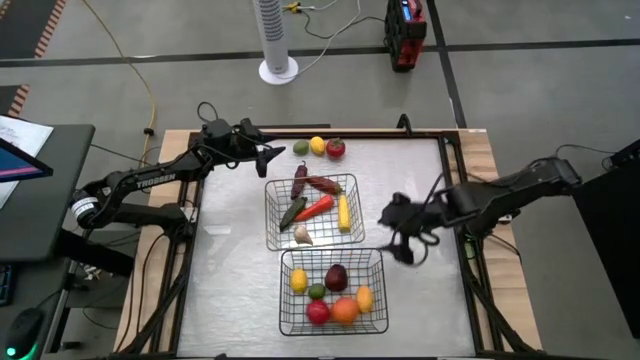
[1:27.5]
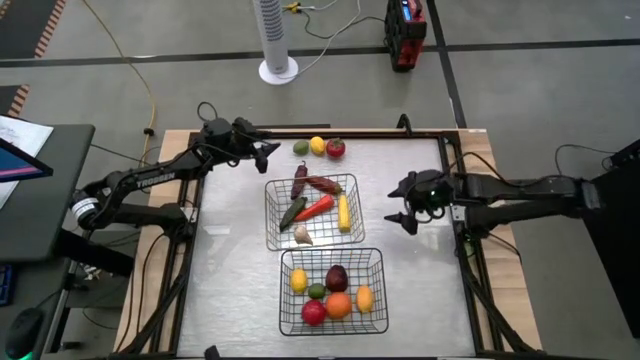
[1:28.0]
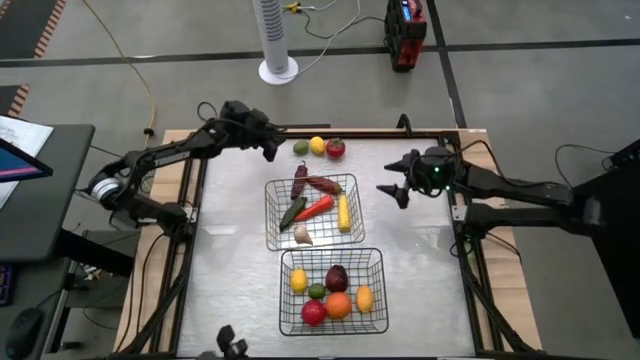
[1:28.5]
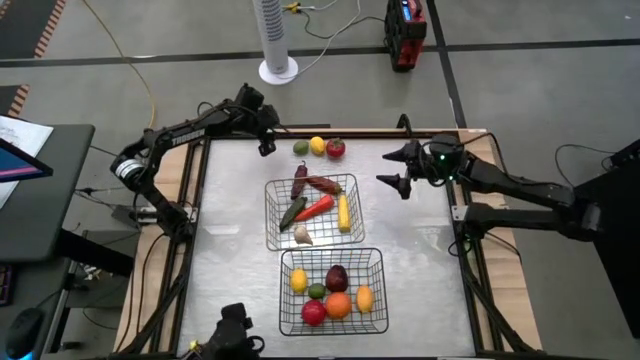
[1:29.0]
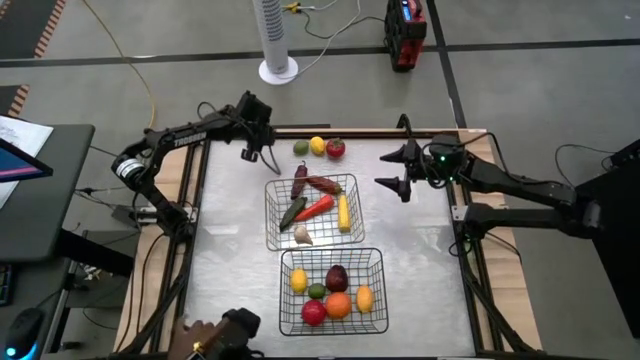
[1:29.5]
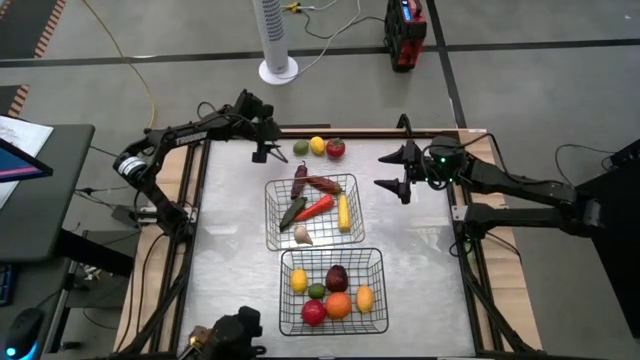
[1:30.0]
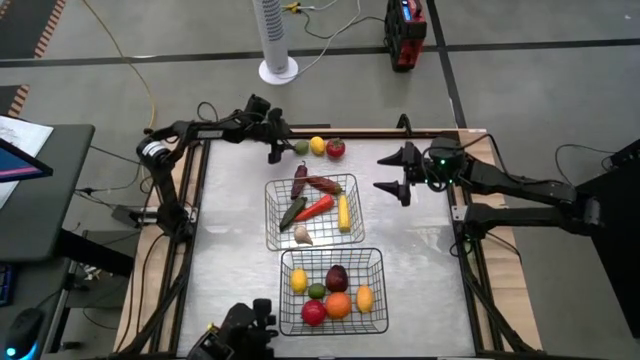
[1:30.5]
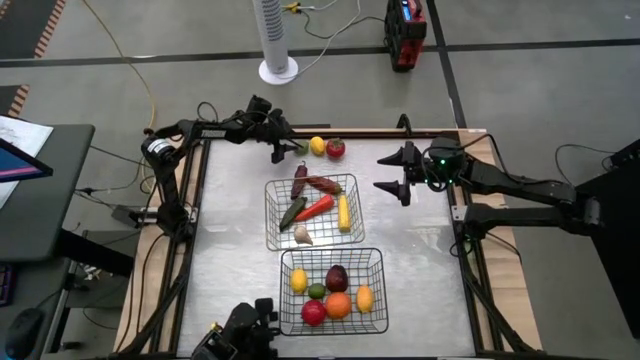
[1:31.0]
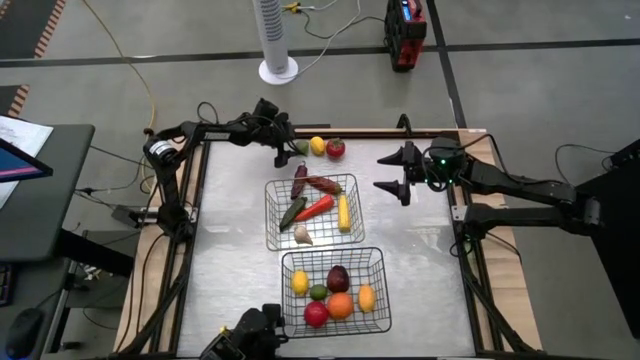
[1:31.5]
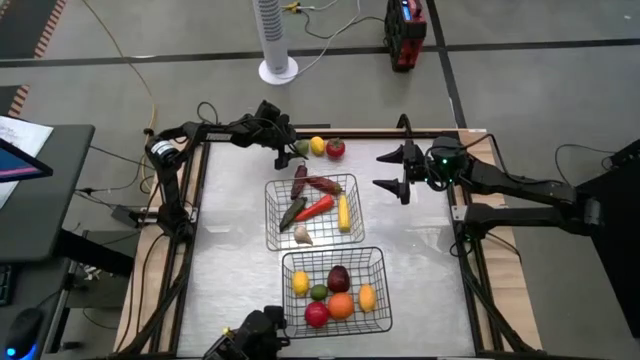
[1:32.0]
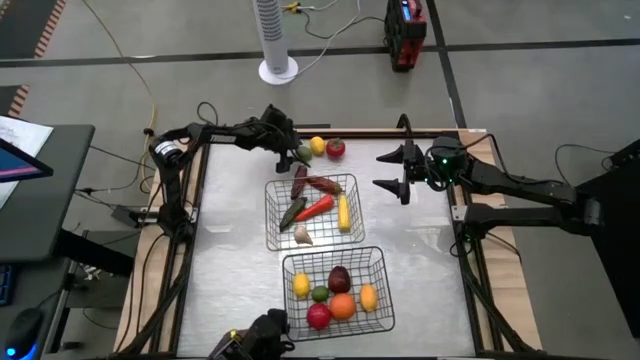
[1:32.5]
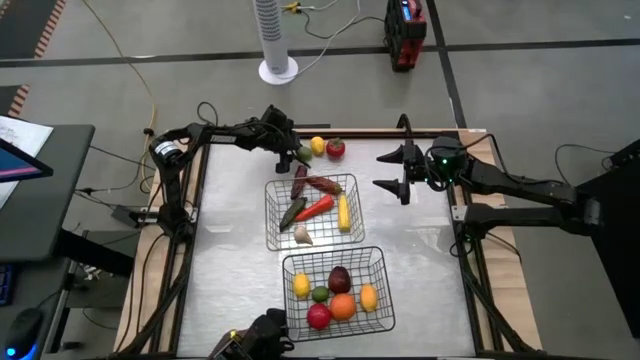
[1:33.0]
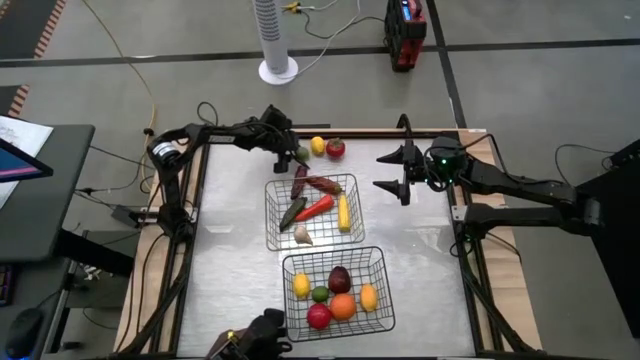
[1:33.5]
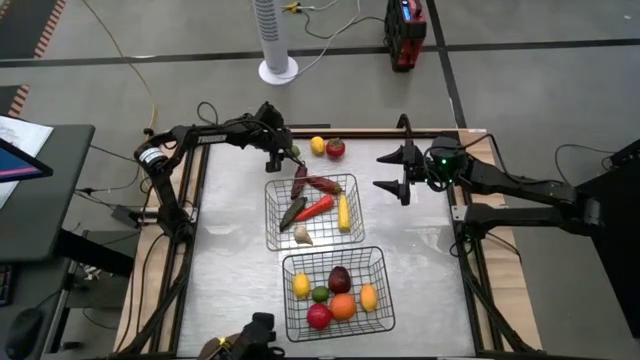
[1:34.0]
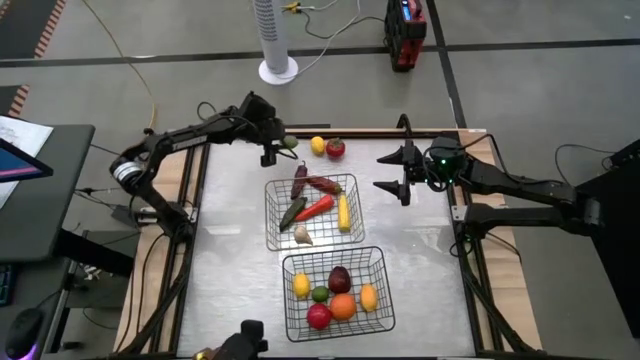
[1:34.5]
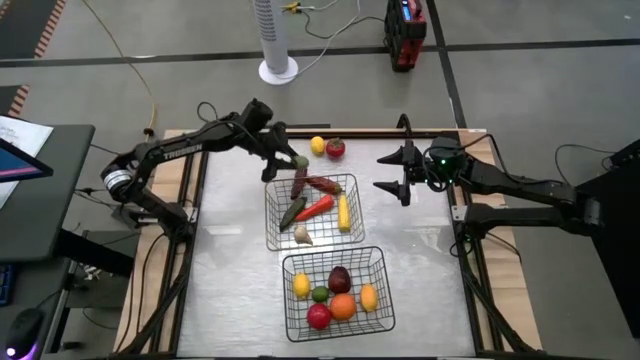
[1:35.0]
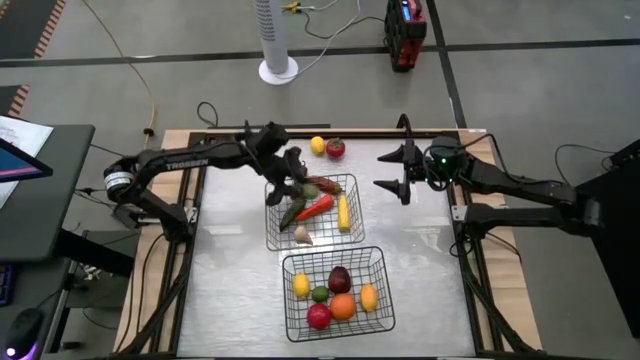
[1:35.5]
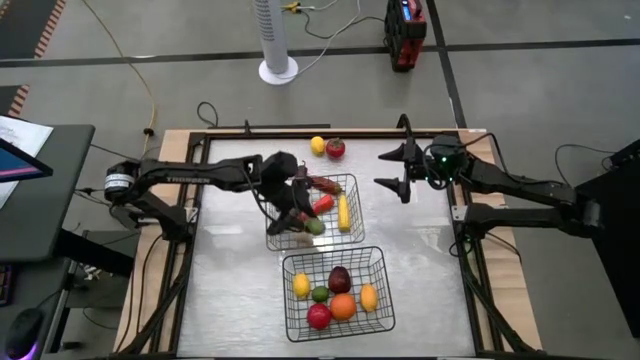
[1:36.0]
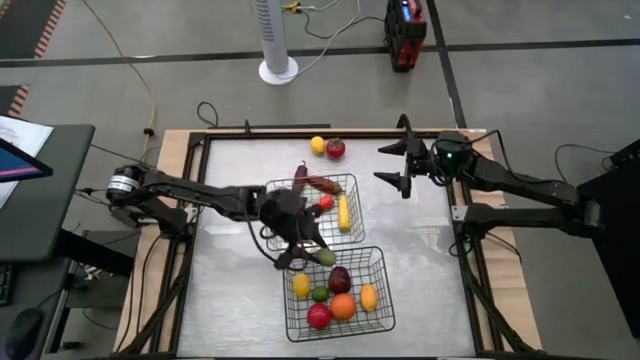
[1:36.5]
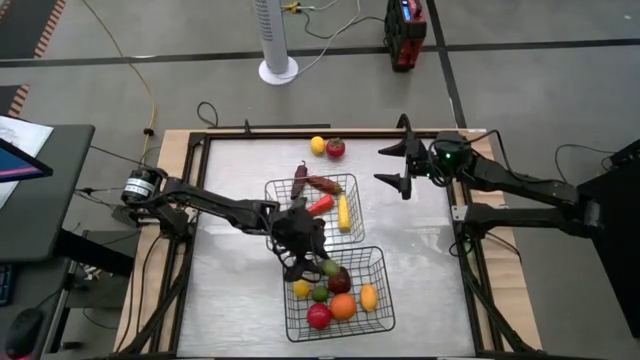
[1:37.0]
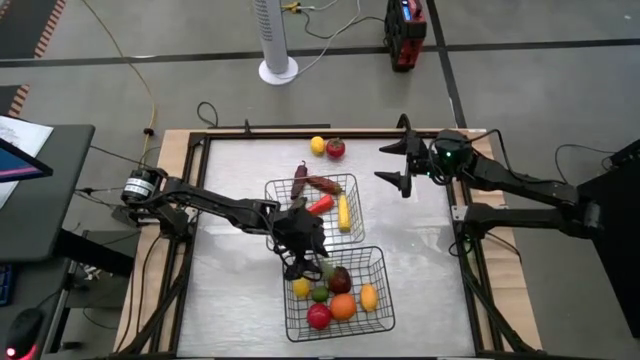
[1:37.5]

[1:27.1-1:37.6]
Task: Sort produce into baskets
Put the lime into the bottom wire basket

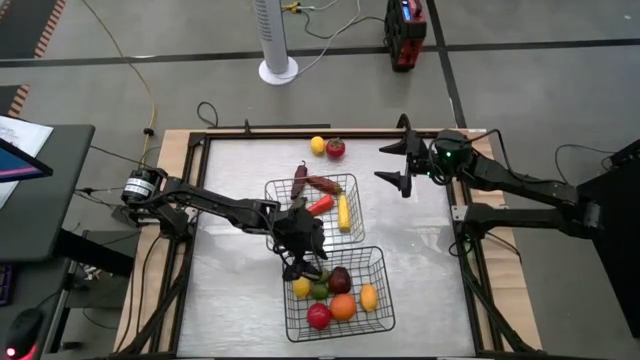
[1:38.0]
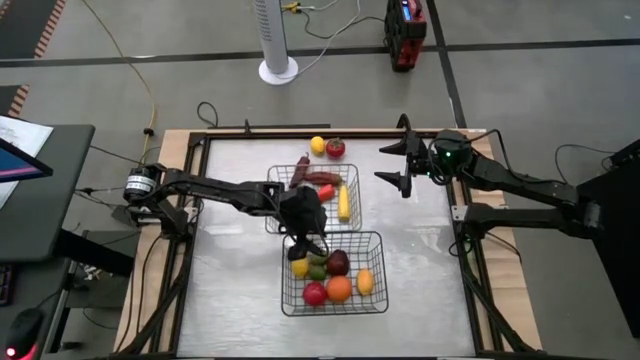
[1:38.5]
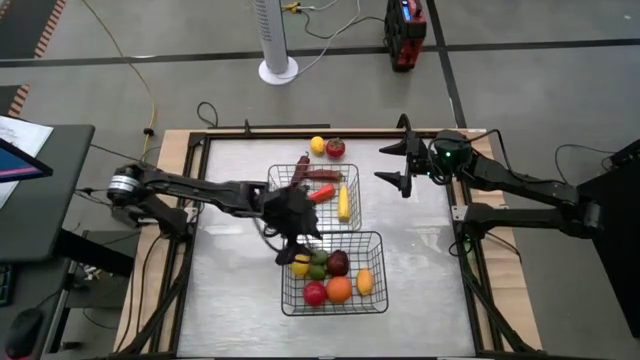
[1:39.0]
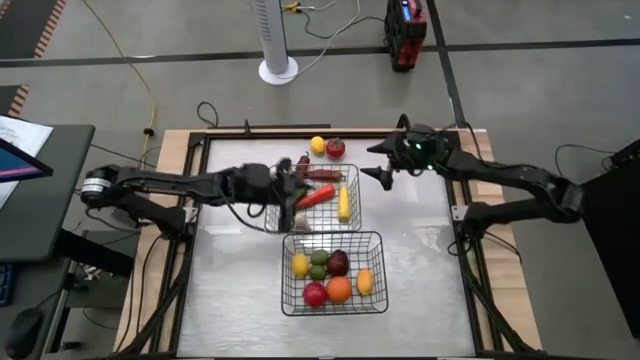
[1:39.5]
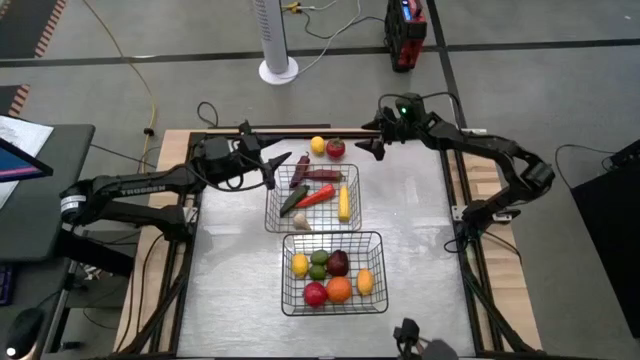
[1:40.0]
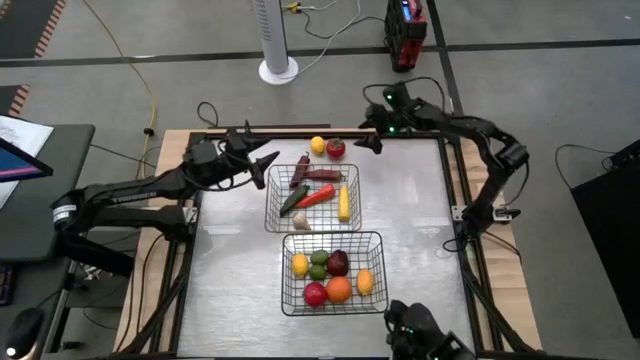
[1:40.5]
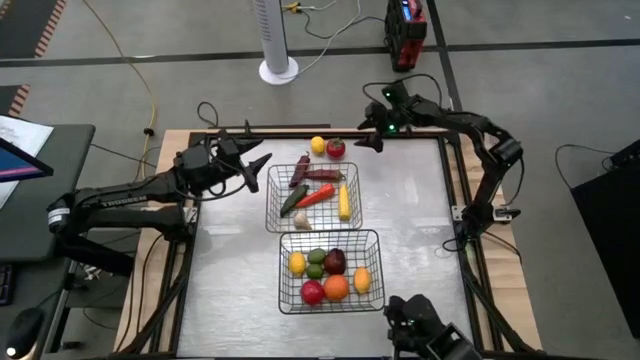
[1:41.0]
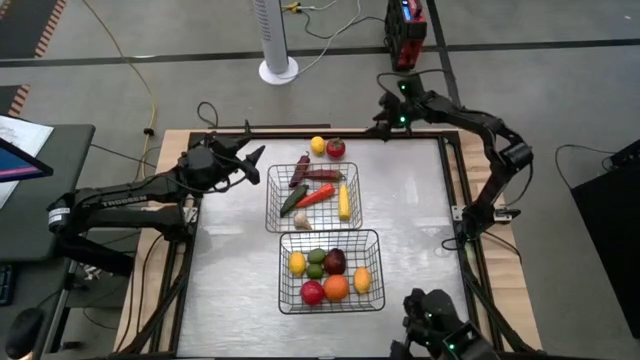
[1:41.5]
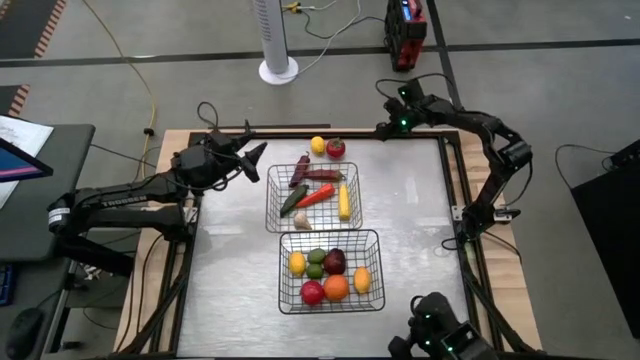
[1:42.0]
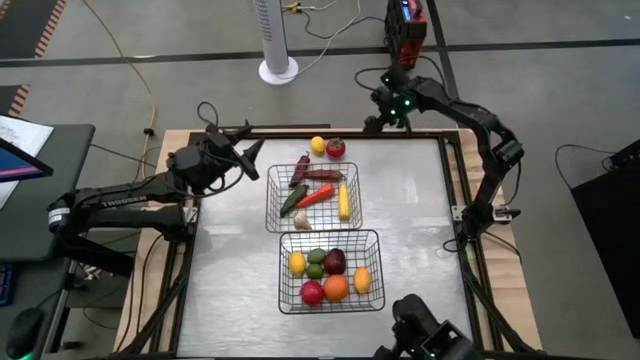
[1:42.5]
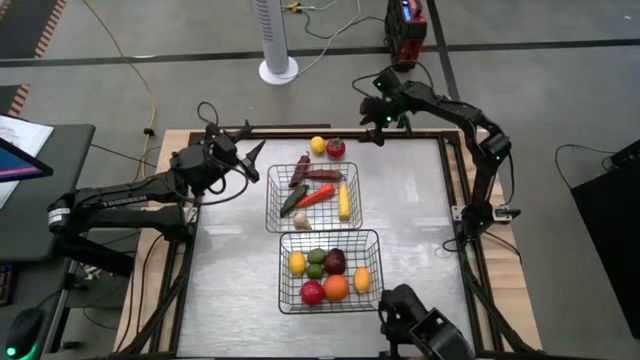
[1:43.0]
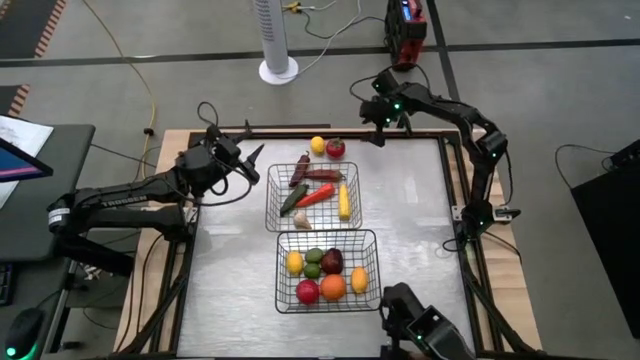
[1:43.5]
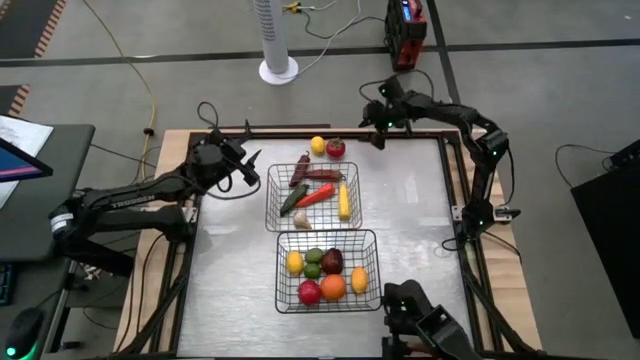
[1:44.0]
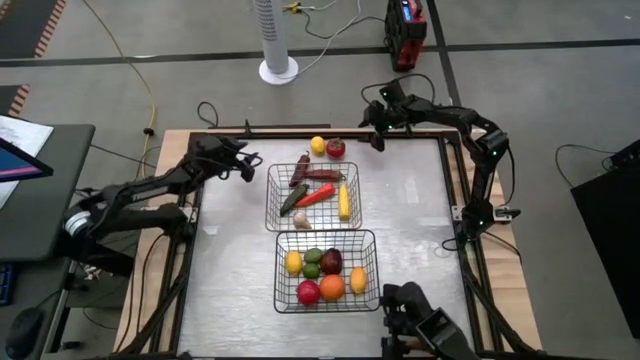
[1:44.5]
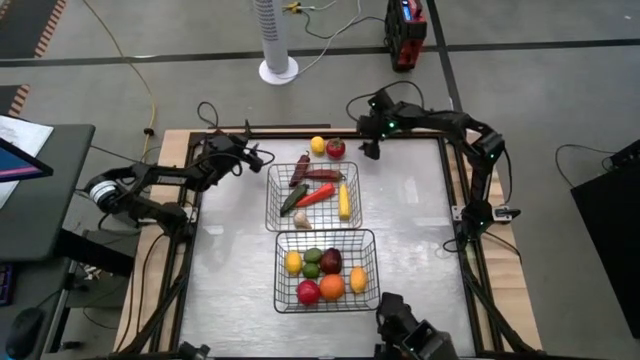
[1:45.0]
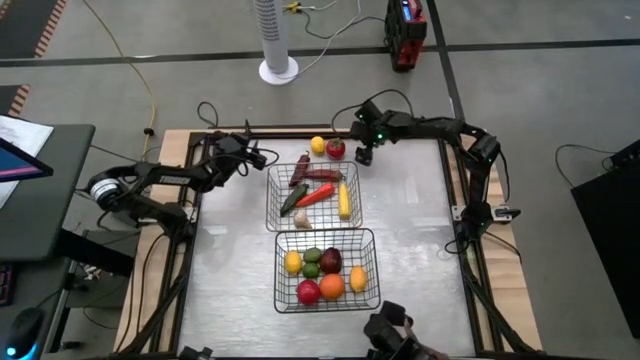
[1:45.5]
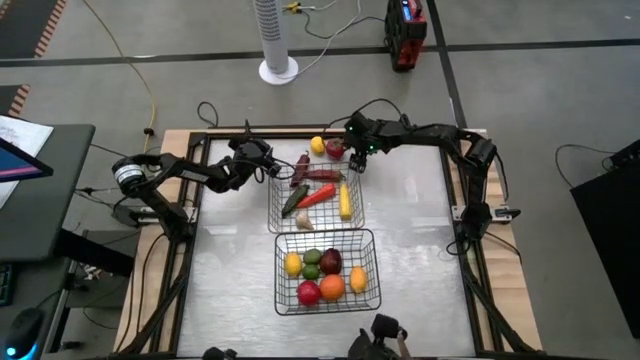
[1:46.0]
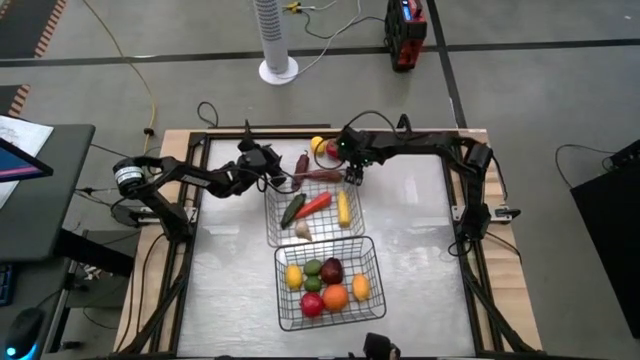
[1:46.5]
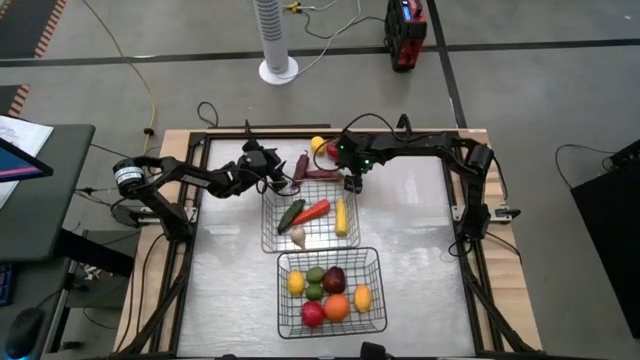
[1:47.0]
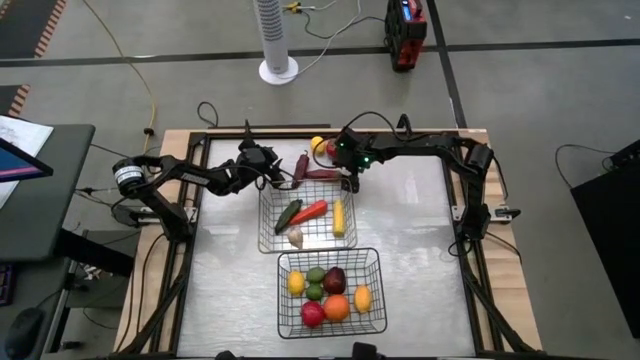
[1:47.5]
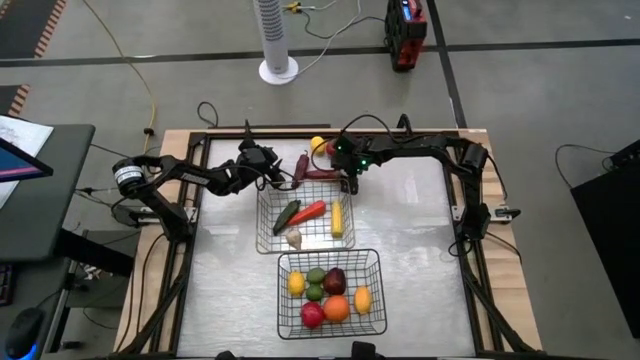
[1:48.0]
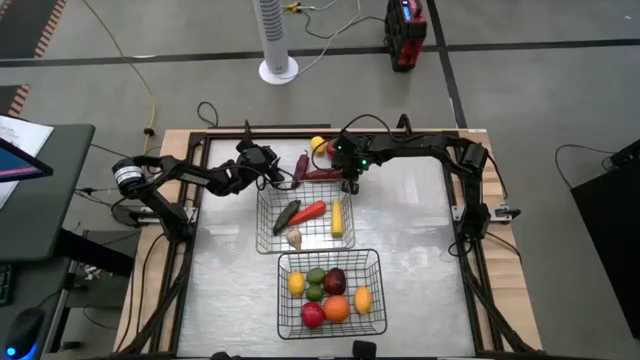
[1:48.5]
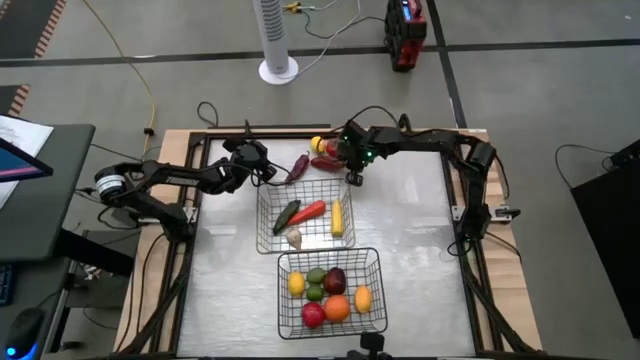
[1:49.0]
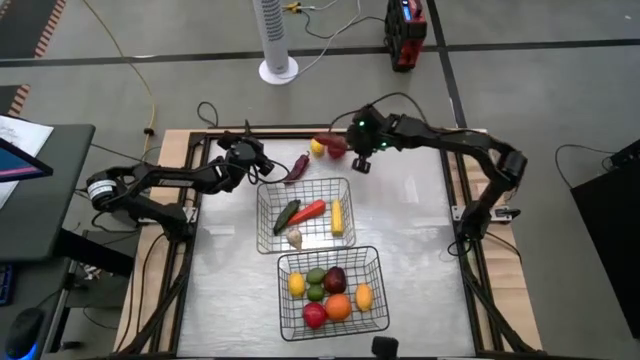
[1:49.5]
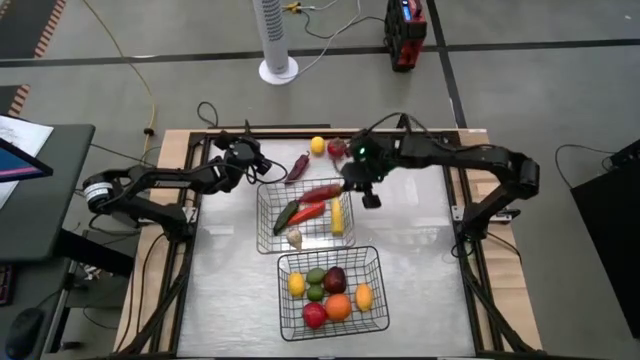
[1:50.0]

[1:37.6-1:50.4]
Put the red chili pepper into the top wire basket
